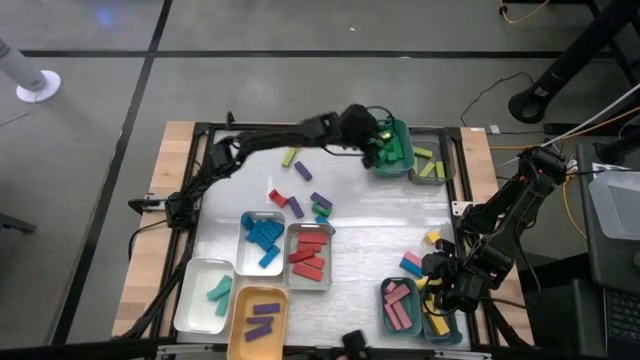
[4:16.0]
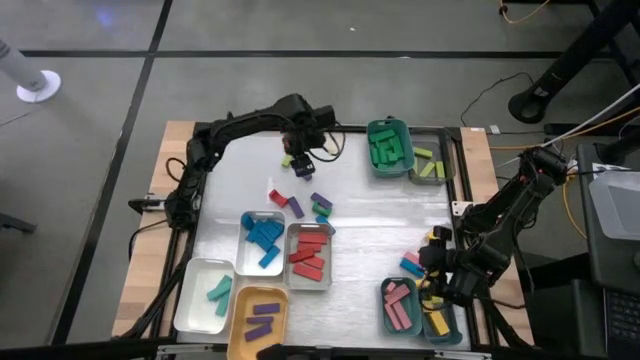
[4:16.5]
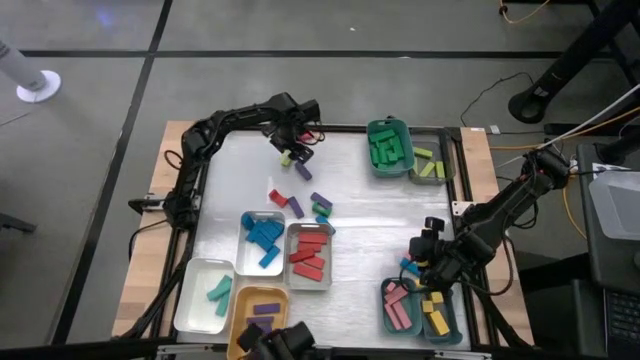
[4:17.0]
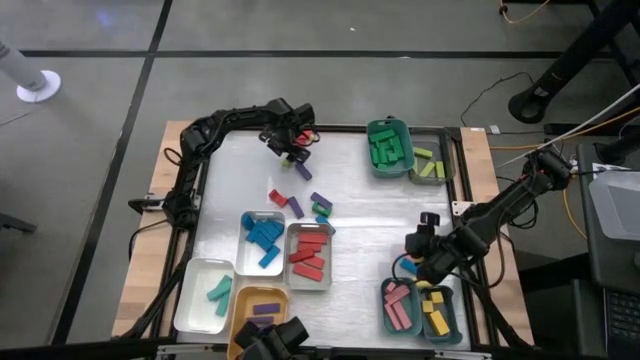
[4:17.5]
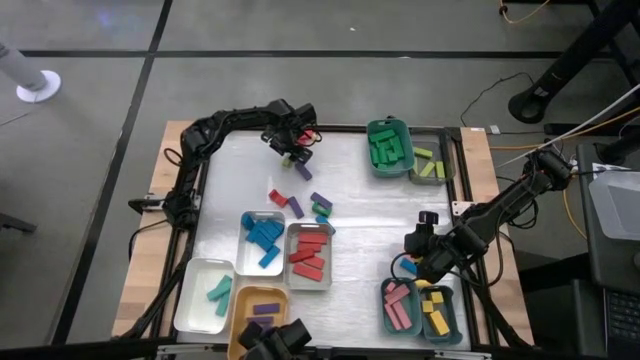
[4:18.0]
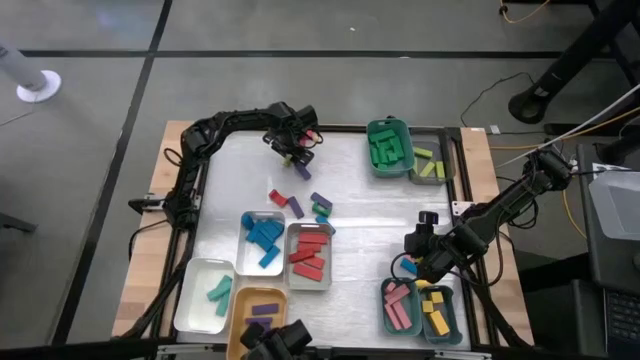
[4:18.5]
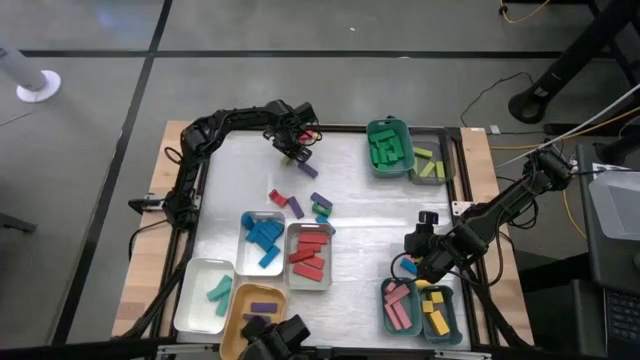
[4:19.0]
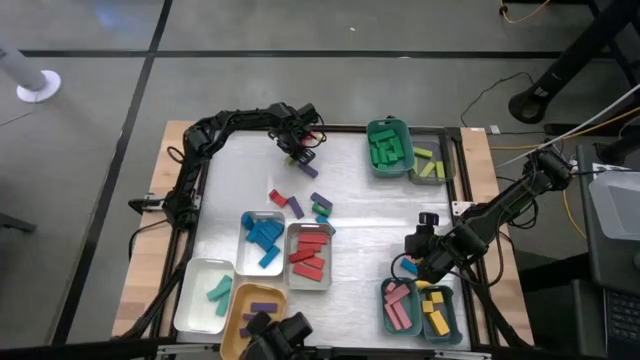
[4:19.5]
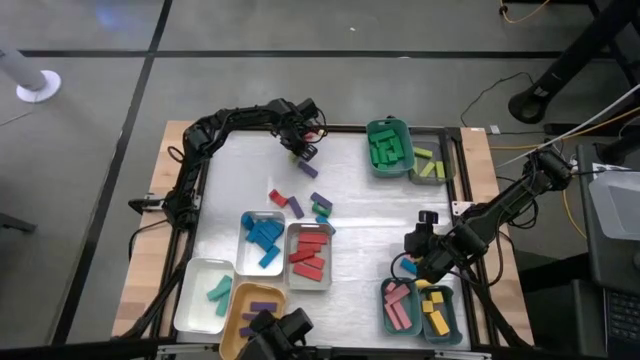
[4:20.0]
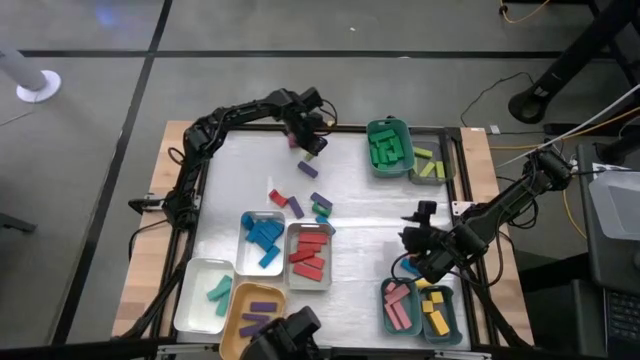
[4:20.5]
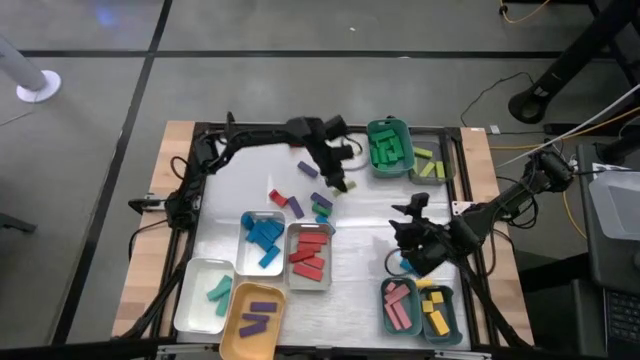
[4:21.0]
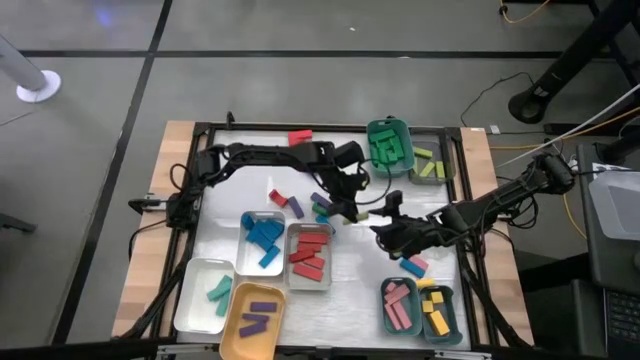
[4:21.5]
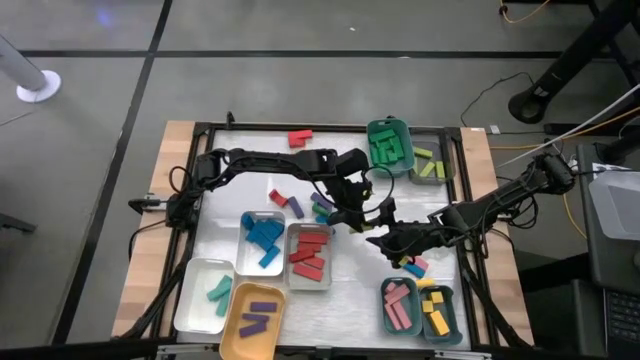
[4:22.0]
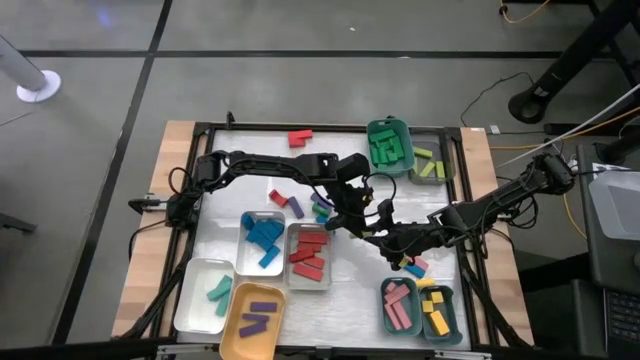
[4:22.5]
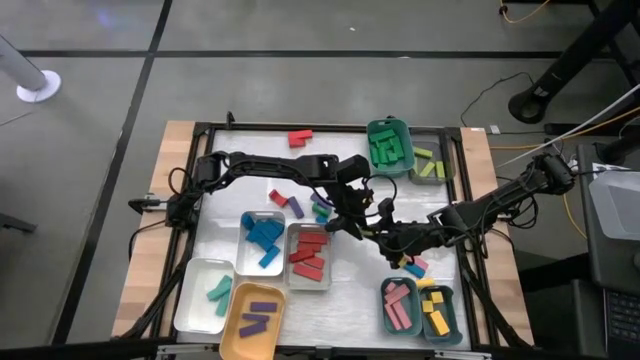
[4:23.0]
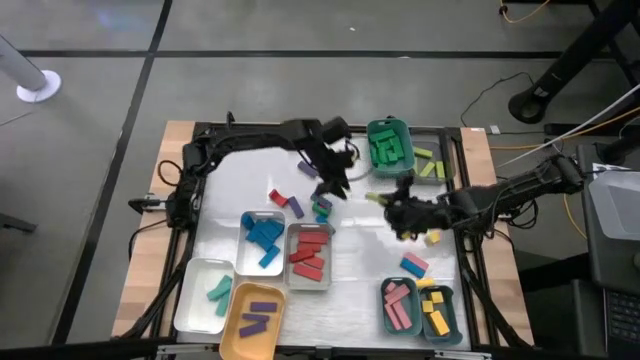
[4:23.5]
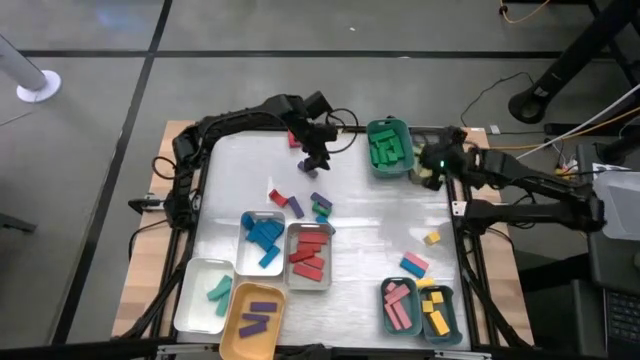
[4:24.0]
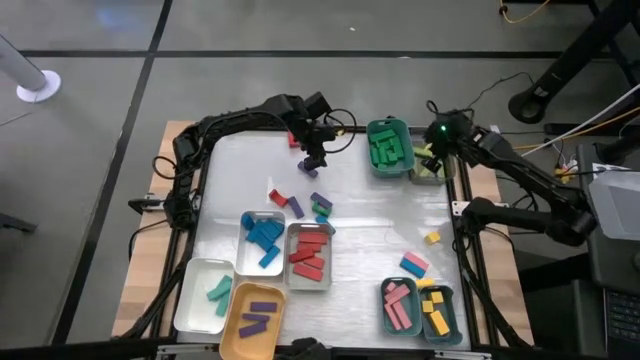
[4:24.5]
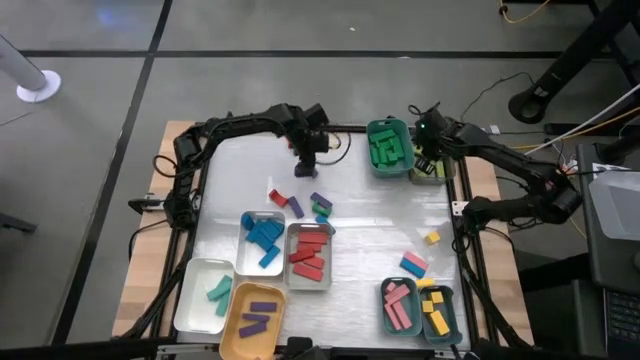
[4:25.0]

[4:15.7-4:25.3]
Task: Sort blocks
Put the light green block into the black bin

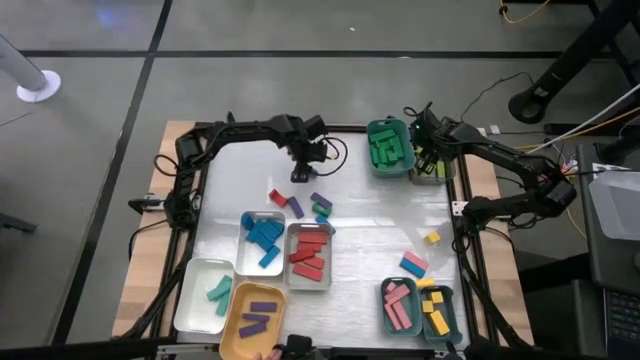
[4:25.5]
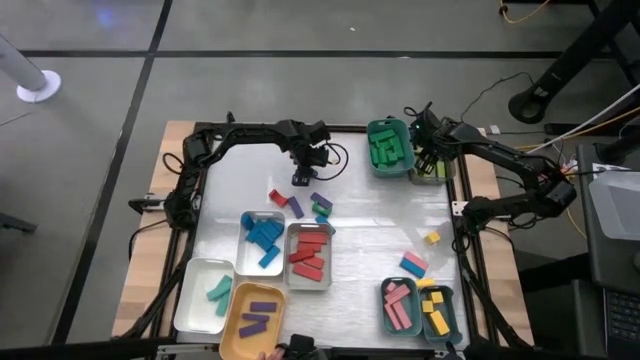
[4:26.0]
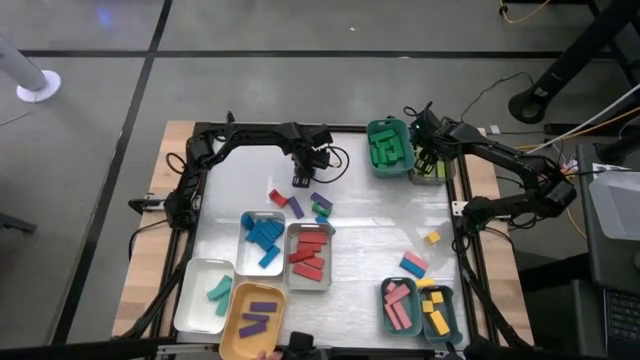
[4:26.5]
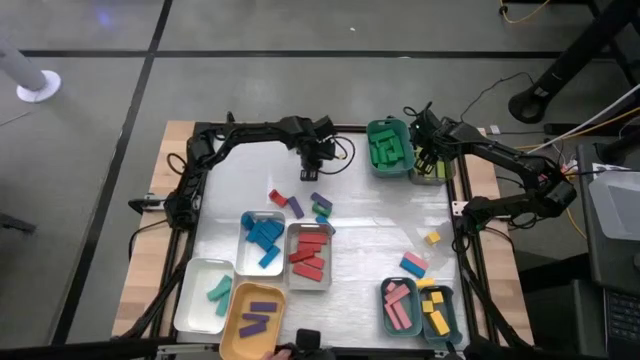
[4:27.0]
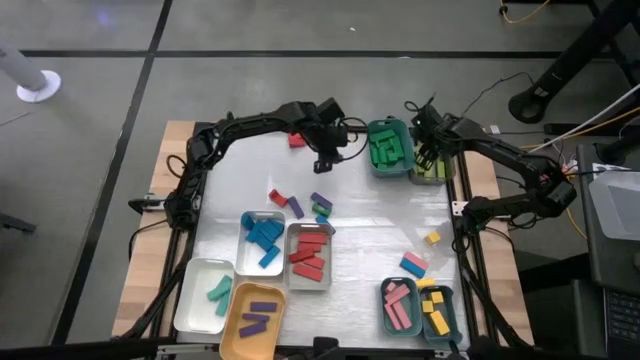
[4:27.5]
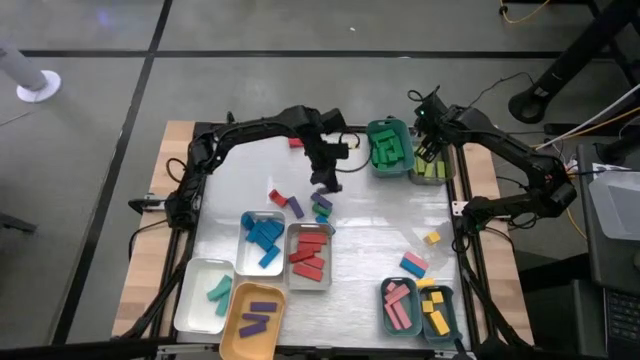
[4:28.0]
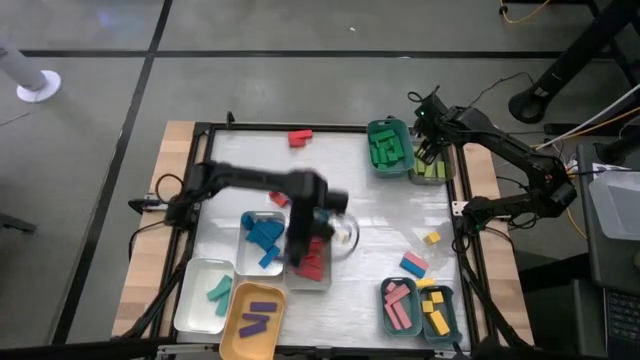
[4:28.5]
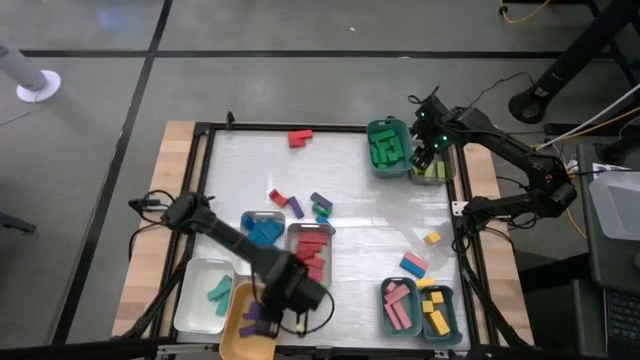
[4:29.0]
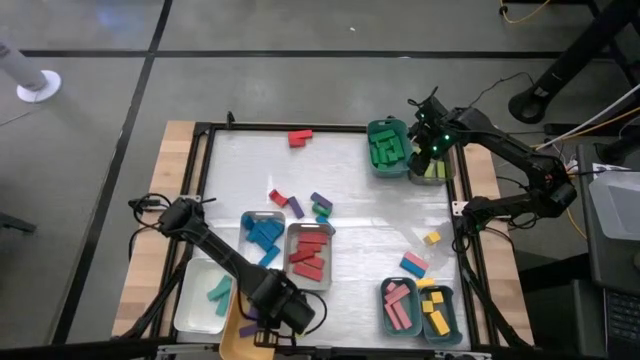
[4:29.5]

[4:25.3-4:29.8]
Put the purple block into the yellow bin

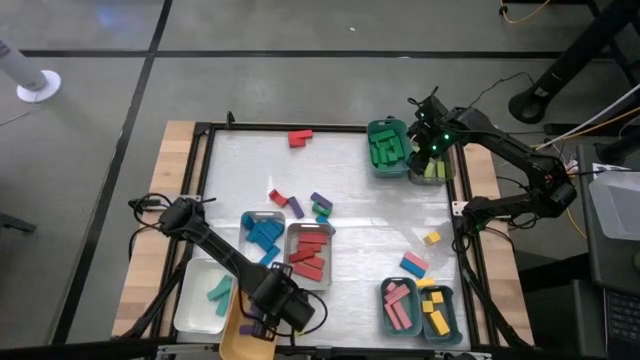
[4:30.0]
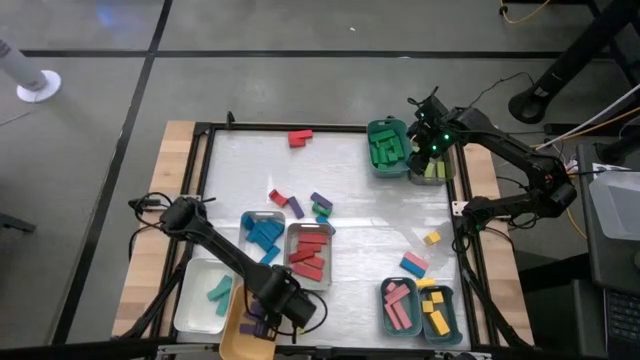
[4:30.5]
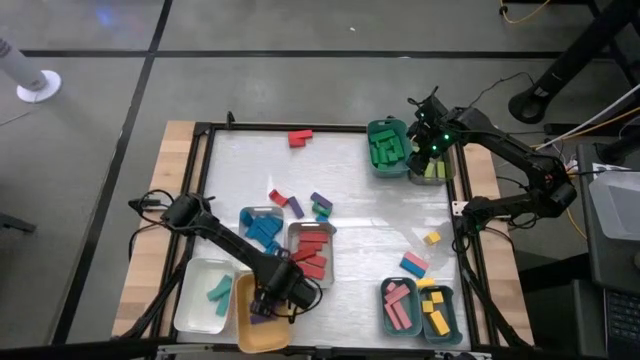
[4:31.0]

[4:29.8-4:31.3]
Adjust the yellow bin on the table

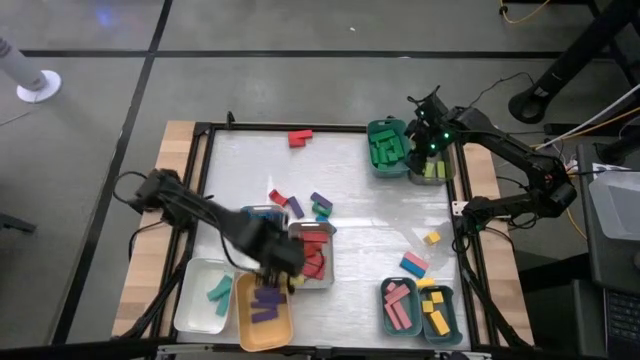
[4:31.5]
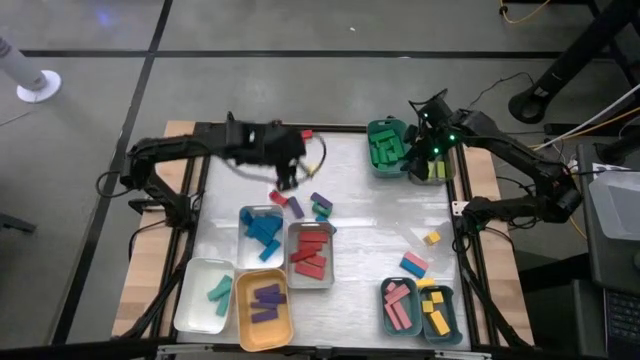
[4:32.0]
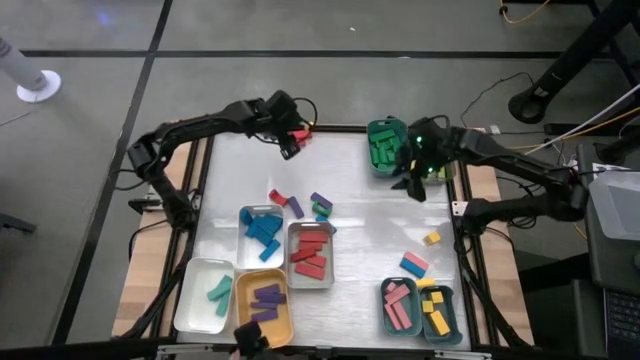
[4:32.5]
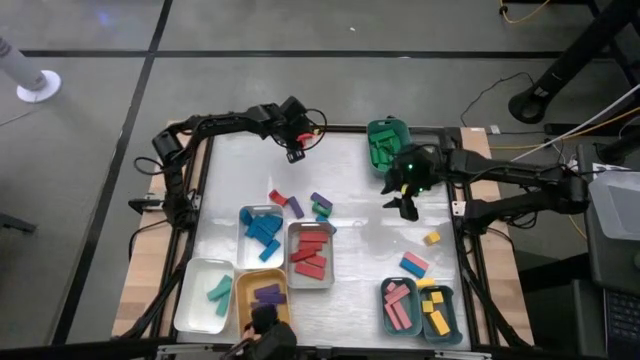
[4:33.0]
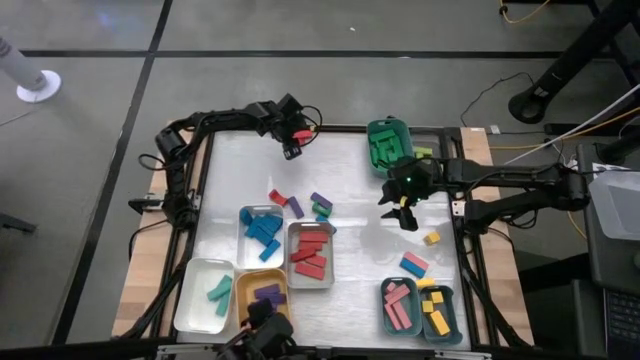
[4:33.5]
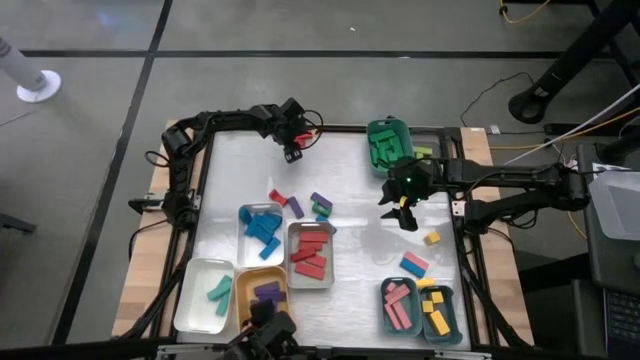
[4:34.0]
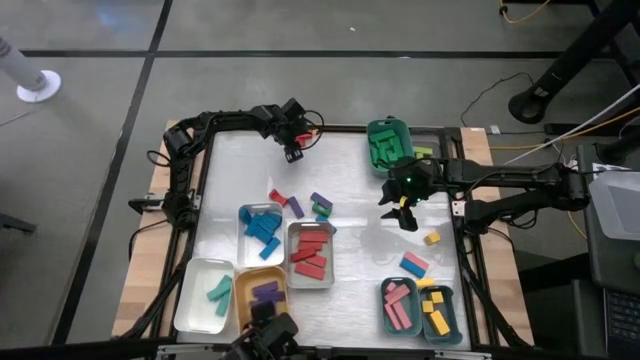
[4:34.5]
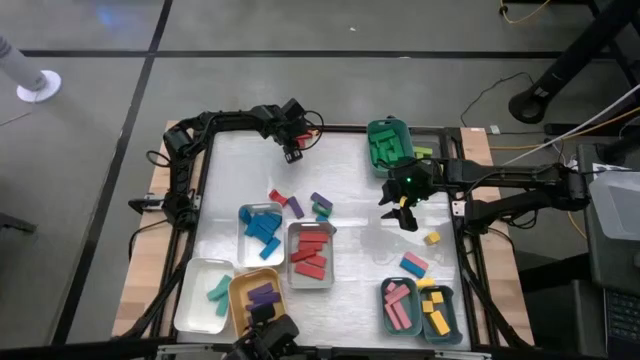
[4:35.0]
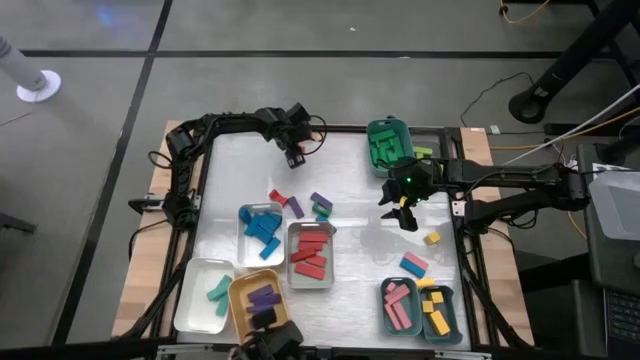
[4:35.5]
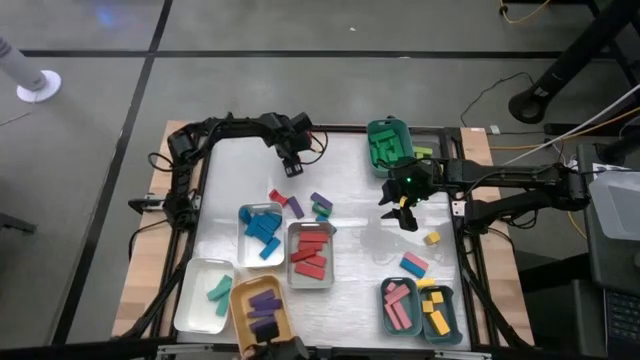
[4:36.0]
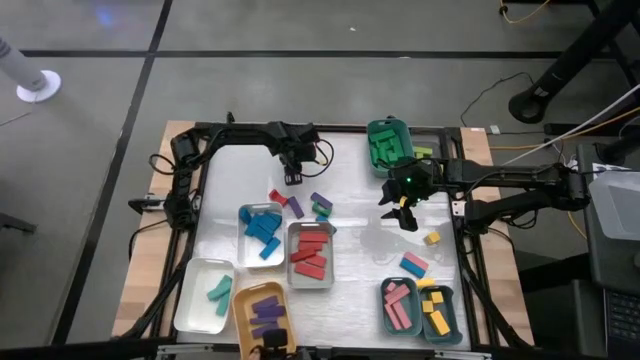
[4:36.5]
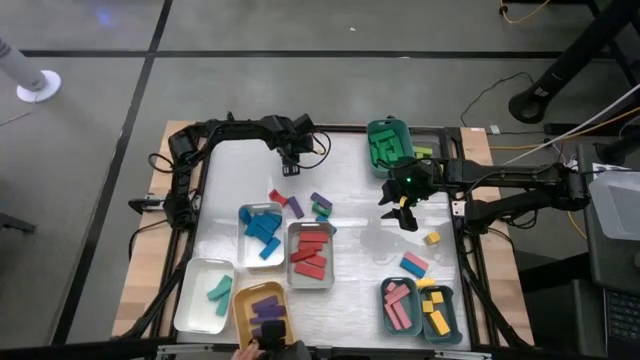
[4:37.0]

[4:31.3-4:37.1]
Adjust the red block on the table
